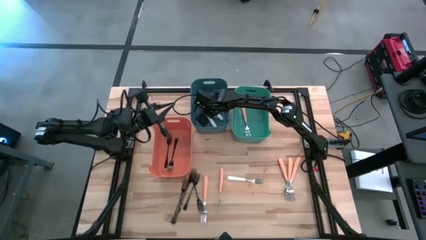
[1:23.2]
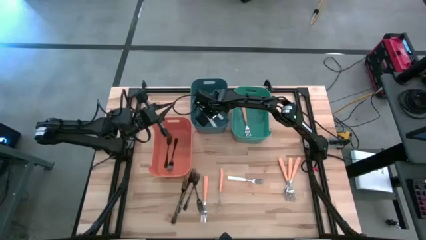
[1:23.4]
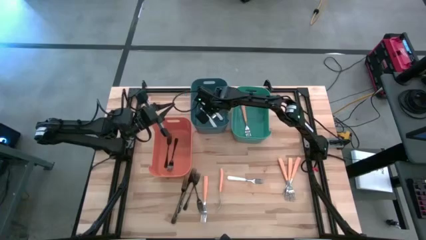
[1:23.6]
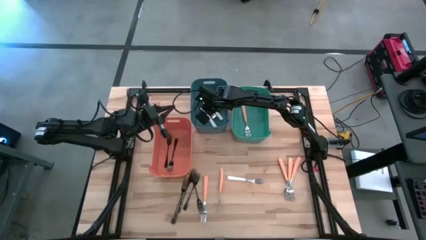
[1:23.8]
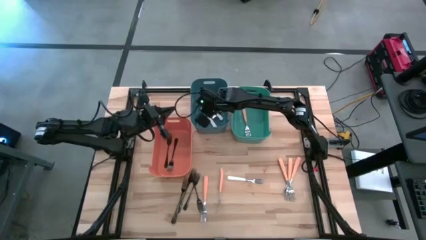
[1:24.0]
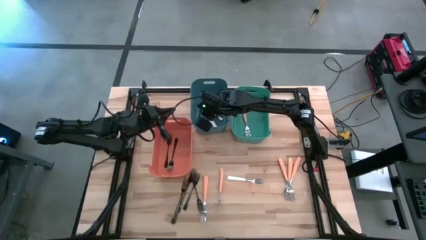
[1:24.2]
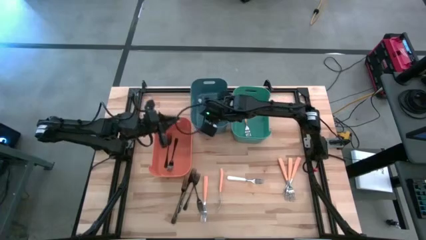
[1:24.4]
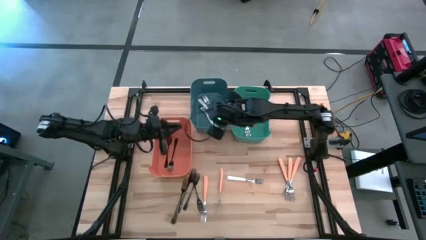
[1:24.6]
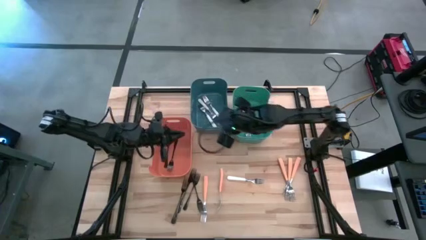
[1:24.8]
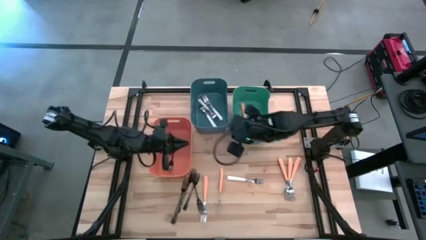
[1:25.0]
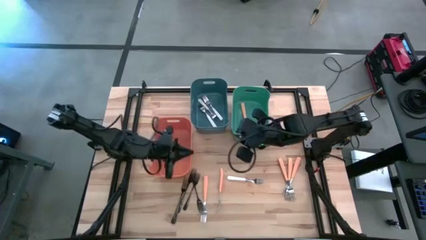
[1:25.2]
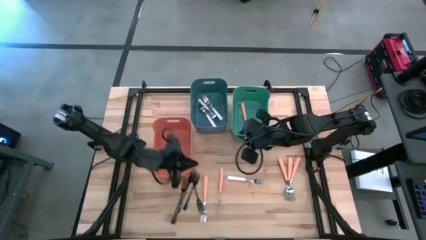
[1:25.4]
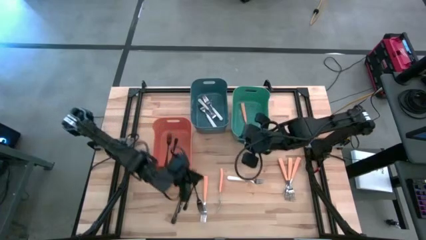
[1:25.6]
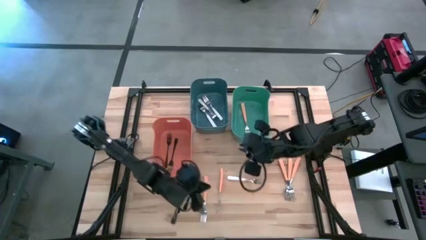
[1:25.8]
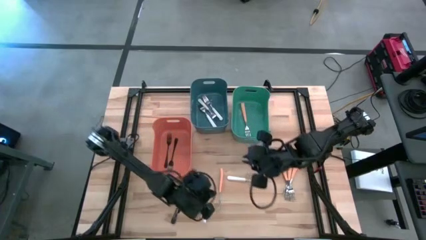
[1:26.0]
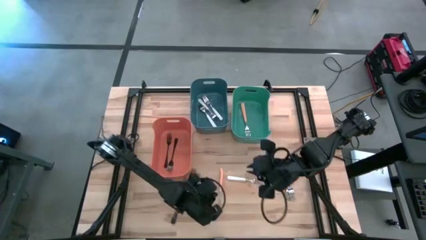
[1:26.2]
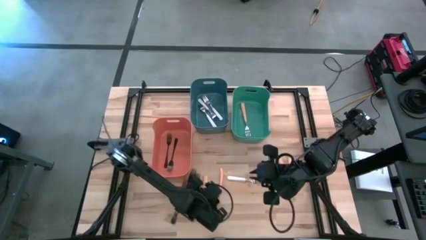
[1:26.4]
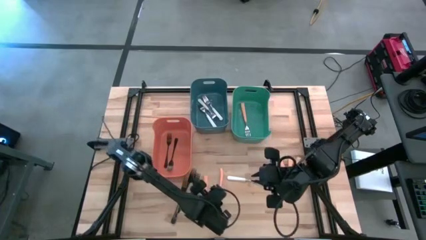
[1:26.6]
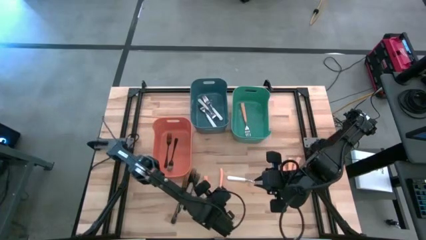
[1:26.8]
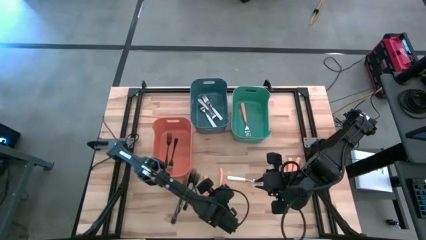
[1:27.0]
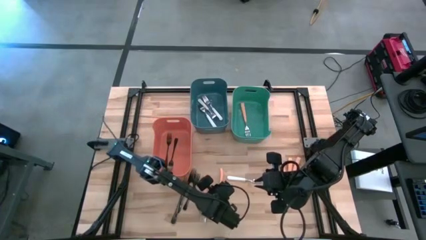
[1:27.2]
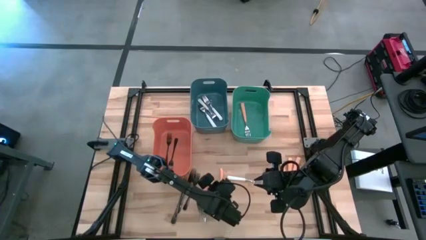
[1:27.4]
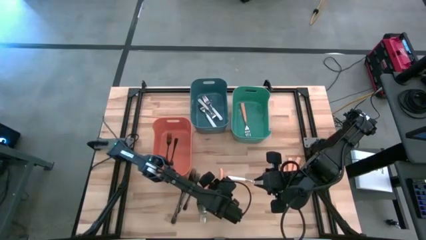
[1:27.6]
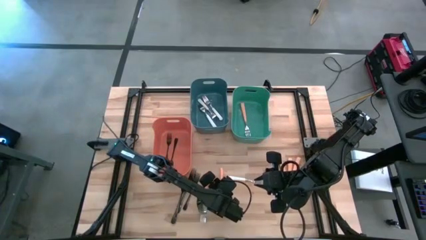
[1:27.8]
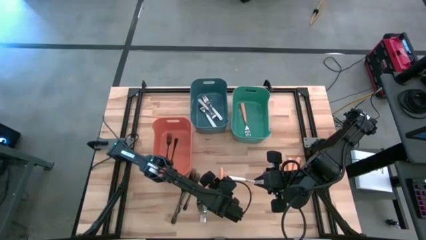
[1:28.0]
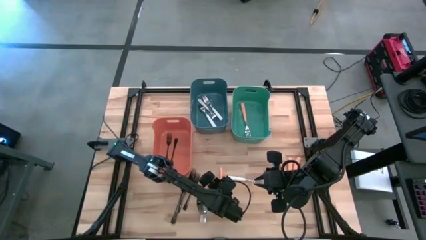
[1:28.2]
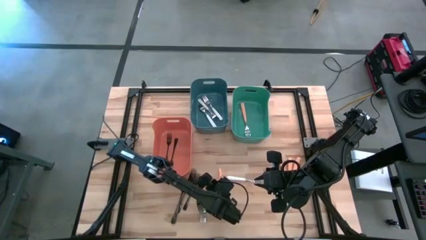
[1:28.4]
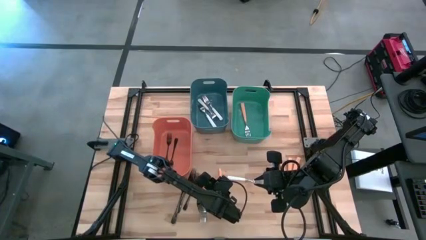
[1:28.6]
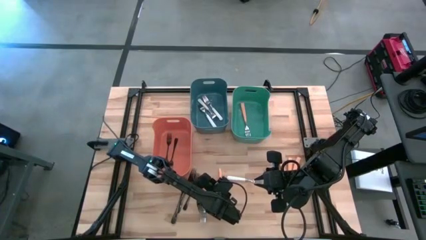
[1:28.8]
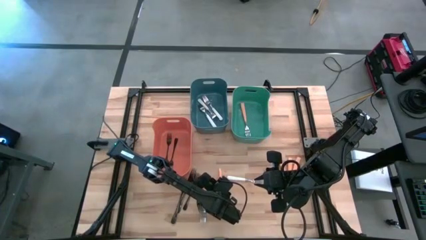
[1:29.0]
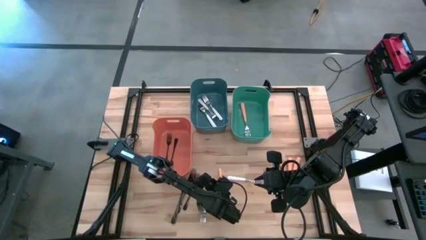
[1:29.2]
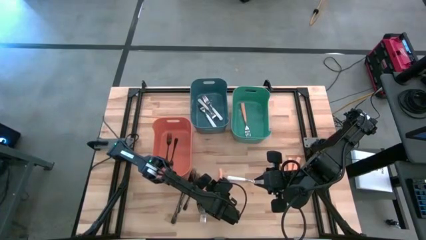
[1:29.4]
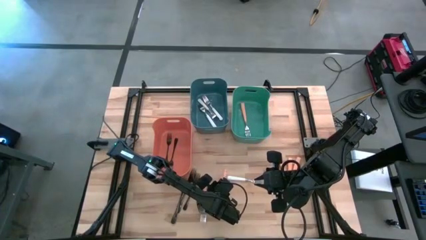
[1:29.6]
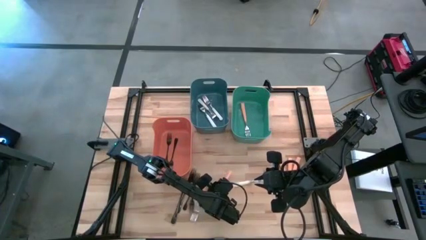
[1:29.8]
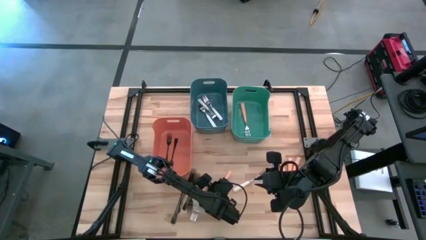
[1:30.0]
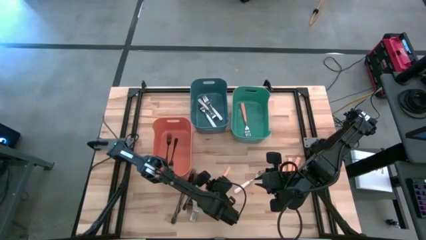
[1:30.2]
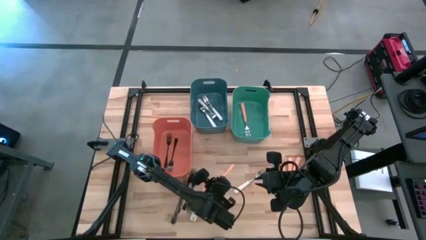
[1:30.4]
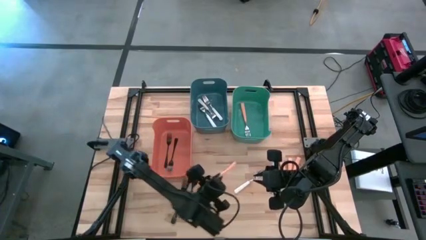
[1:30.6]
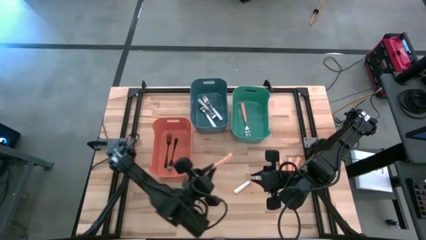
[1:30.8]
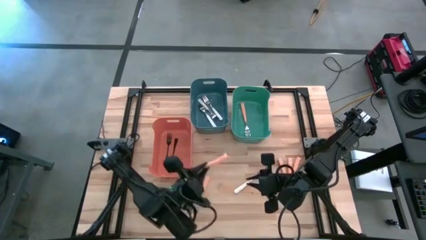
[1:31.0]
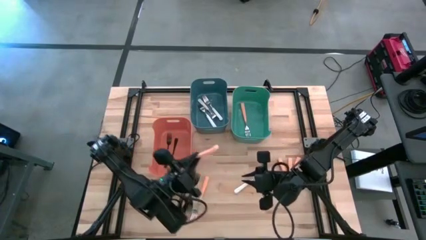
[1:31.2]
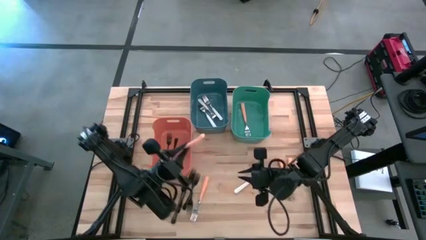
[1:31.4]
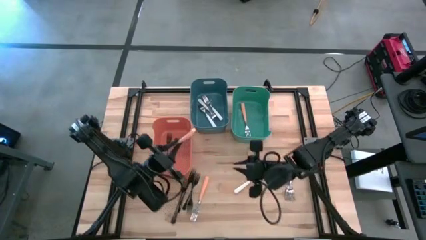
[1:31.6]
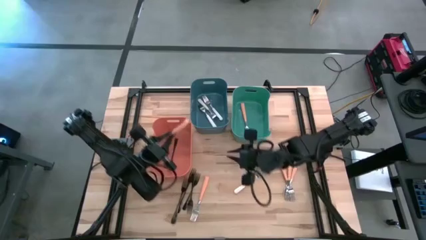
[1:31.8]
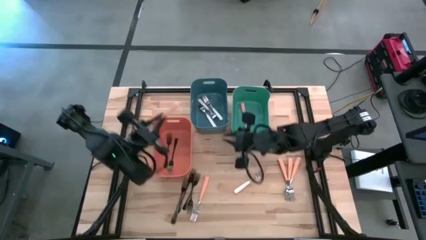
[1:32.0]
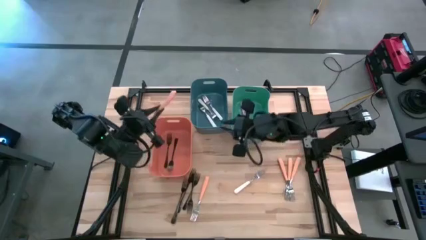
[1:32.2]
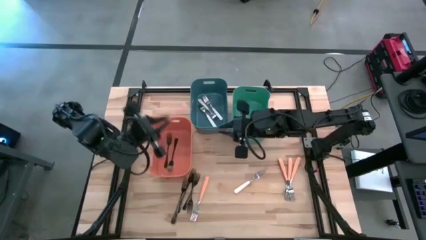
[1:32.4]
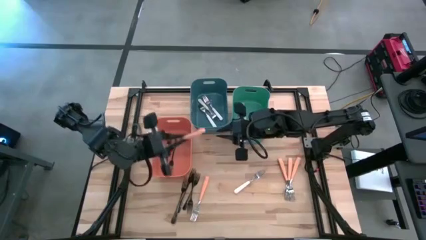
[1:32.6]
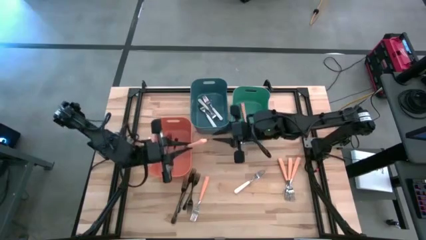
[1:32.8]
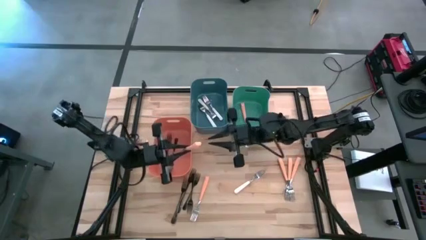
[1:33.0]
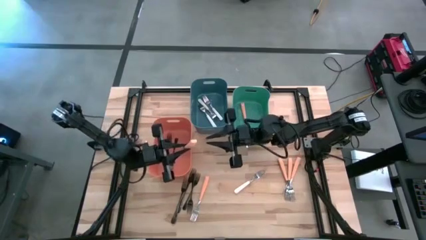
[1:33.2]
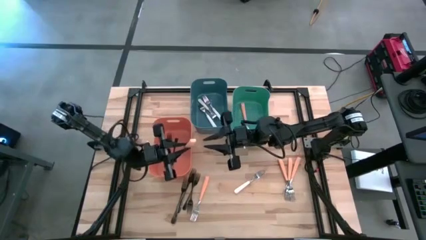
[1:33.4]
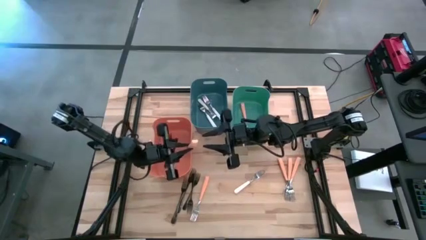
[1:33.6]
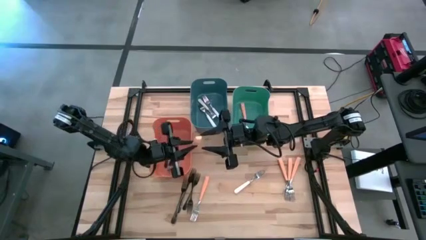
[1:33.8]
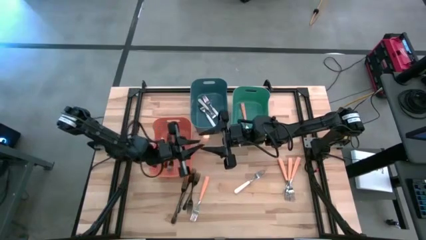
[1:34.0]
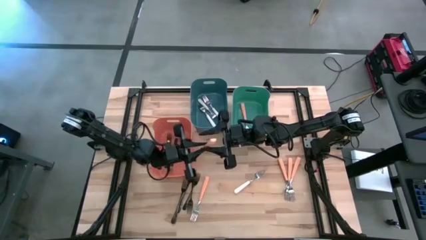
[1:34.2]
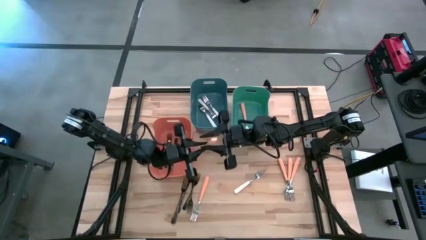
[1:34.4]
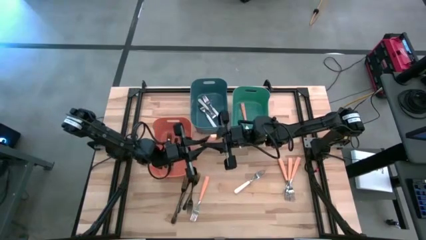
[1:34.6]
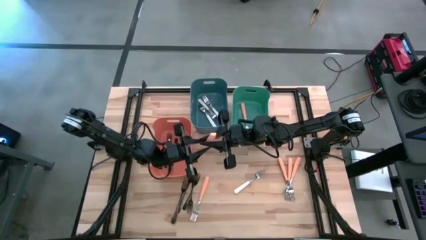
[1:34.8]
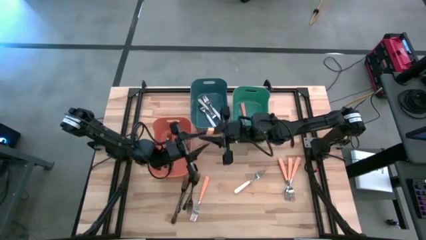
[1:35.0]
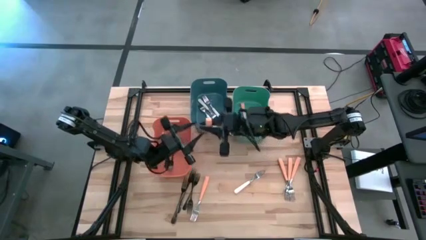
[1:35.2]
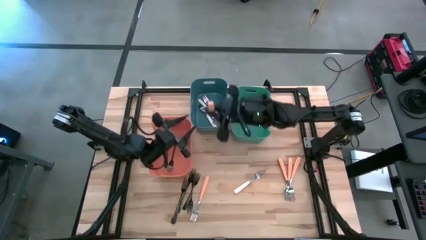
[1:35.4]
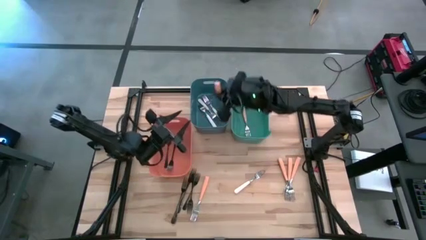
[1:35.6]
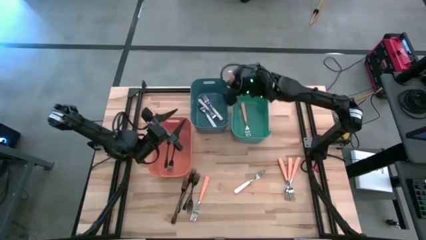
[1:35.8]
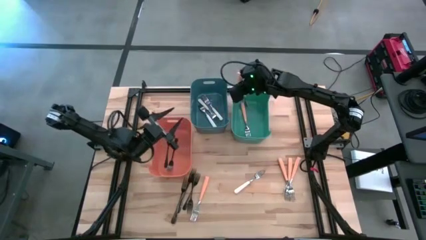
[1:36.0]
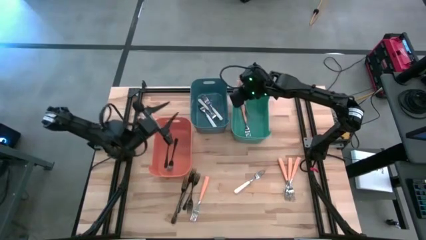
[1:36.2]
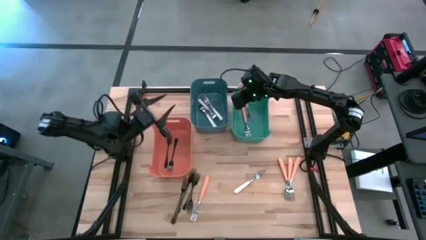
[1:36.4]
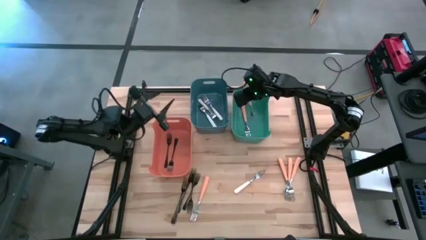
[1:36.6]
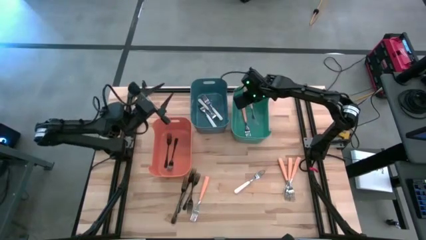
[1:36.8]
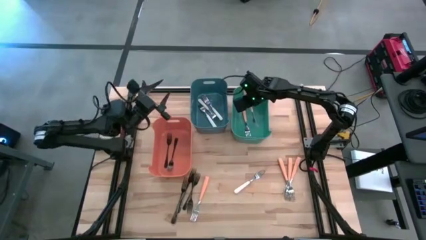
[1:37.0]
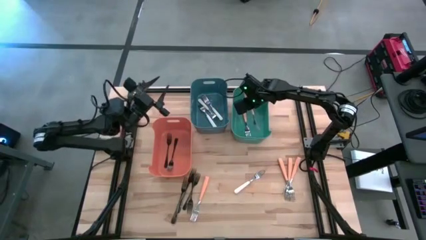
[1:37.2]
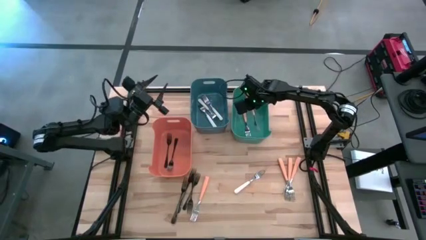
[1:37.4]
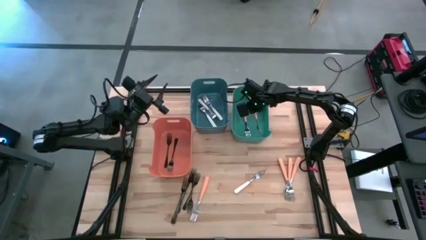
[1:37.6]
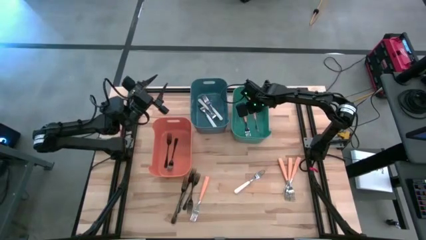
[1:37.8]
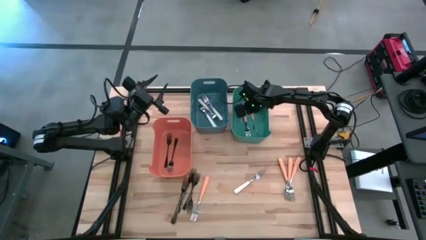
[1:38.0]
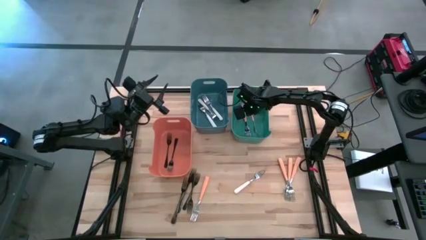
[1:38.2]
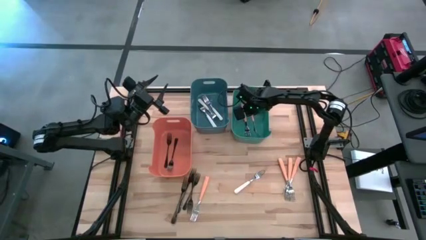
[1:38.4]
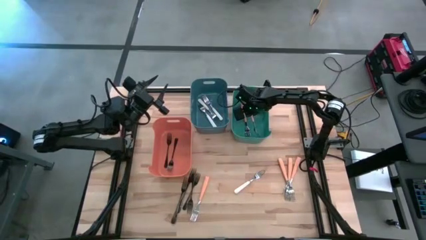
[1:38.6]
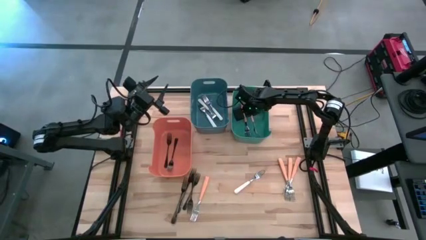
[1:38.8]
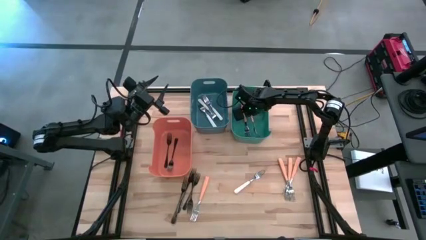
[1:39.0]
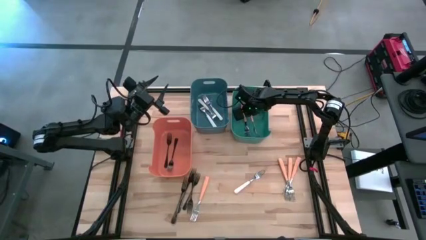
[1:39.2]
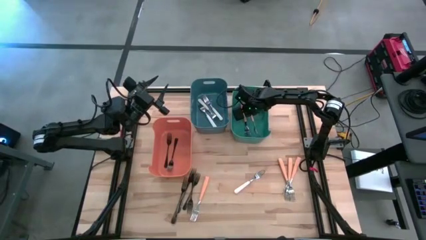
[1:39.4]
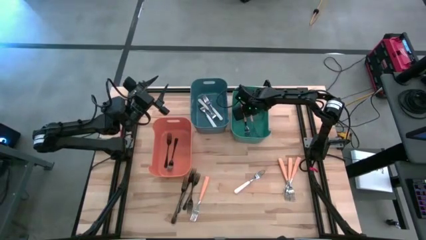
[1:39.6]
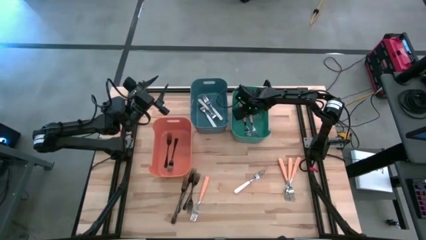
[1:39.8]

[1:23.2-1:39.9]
Task: Sort silverware by color (type)
Put the orange fork into the green bin
